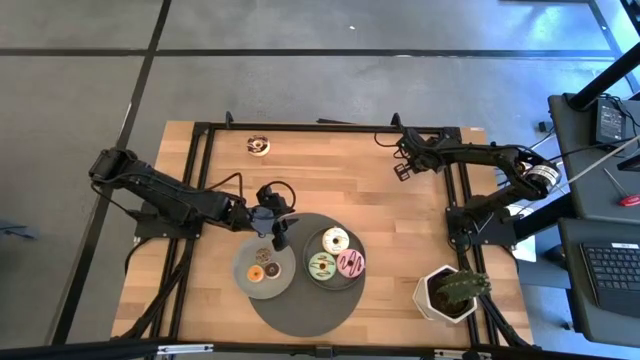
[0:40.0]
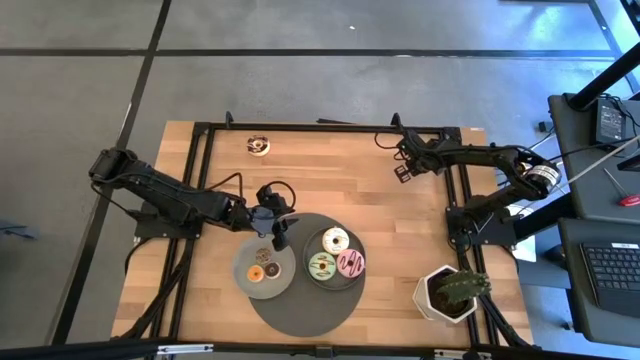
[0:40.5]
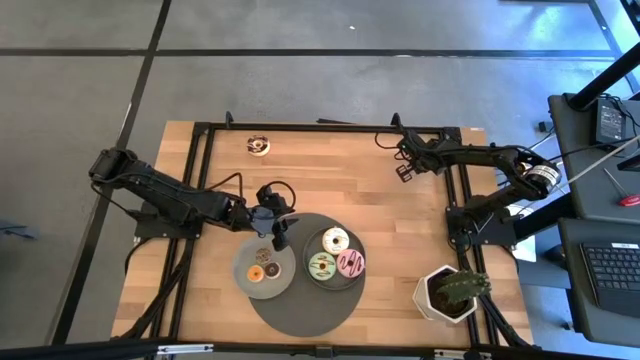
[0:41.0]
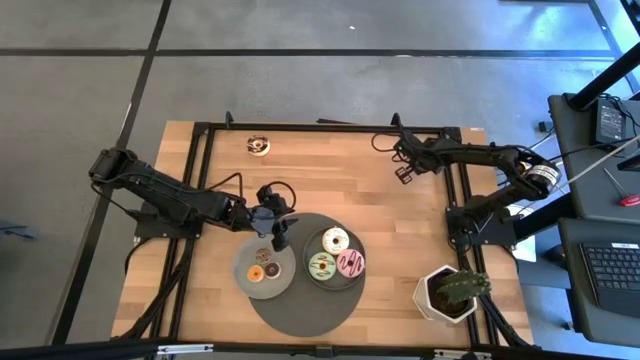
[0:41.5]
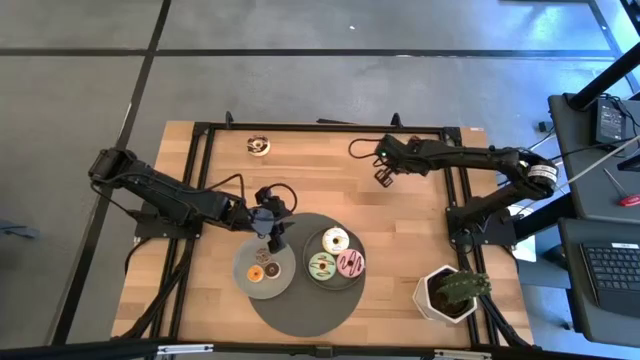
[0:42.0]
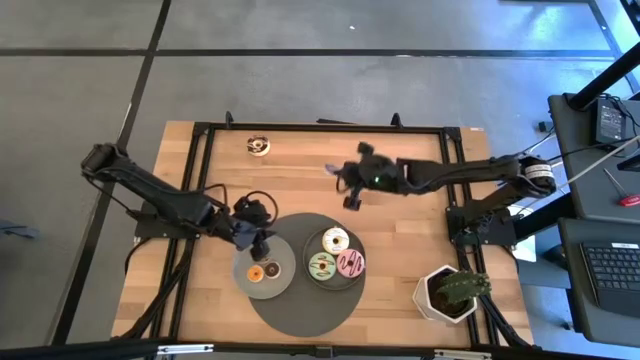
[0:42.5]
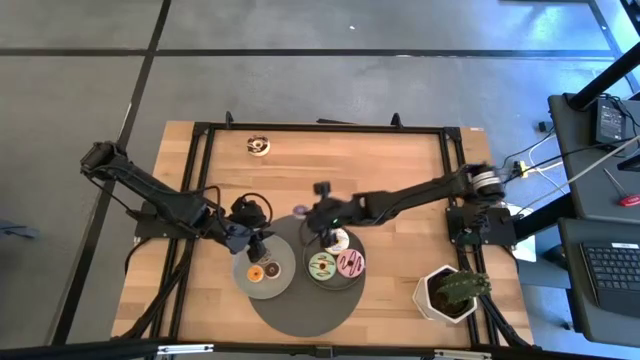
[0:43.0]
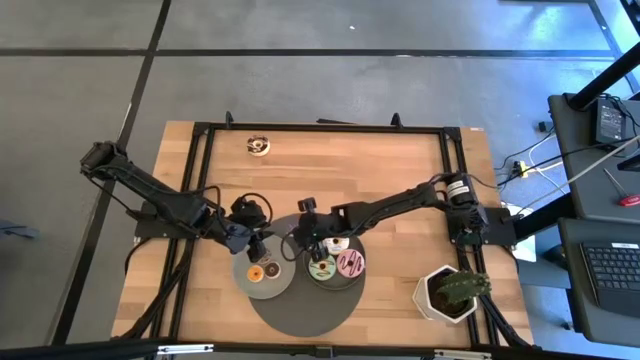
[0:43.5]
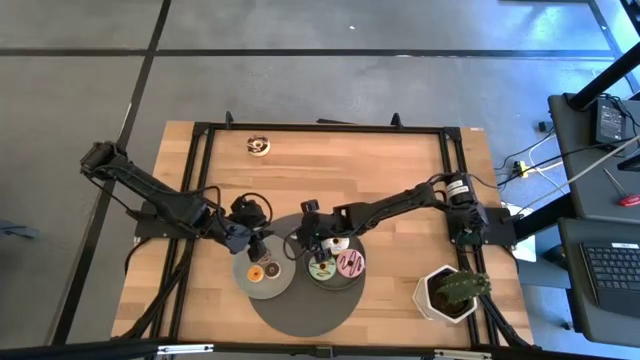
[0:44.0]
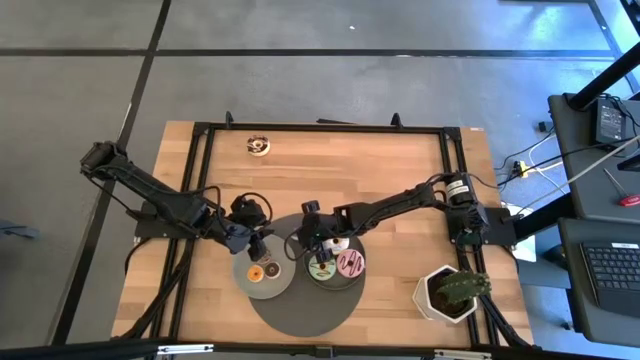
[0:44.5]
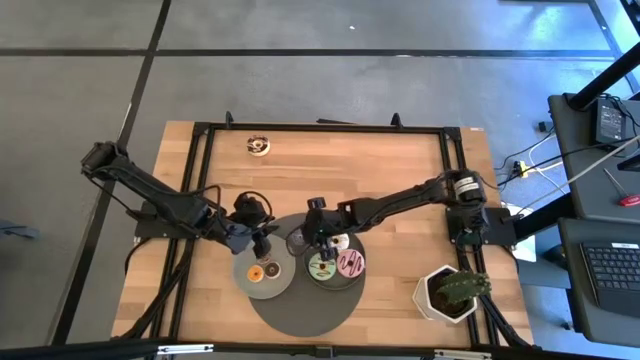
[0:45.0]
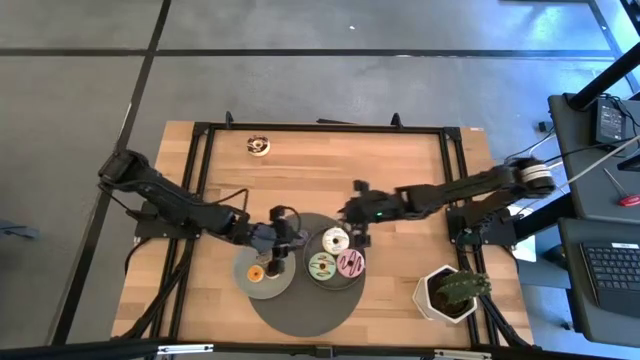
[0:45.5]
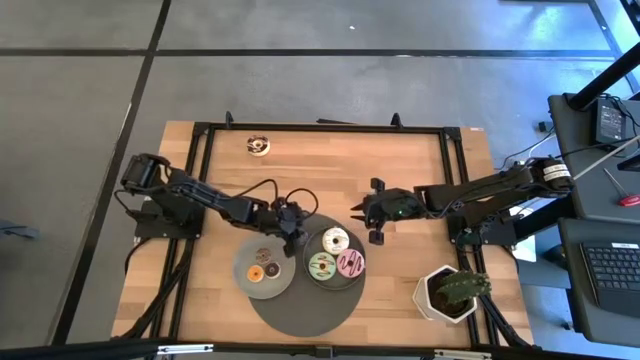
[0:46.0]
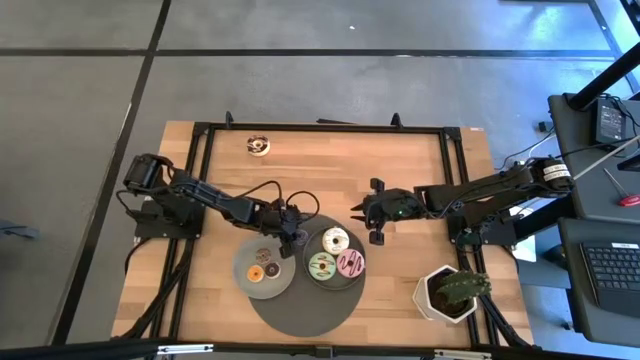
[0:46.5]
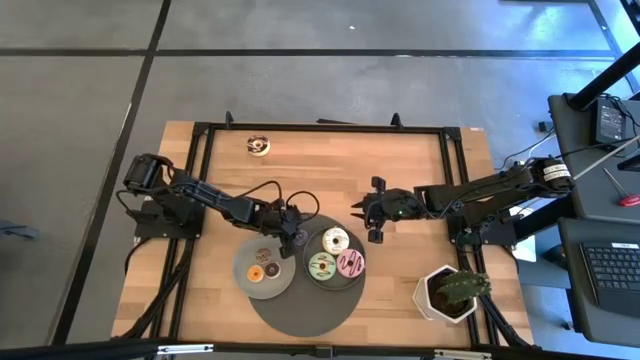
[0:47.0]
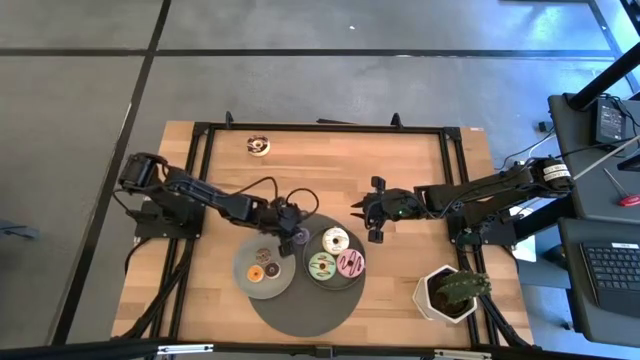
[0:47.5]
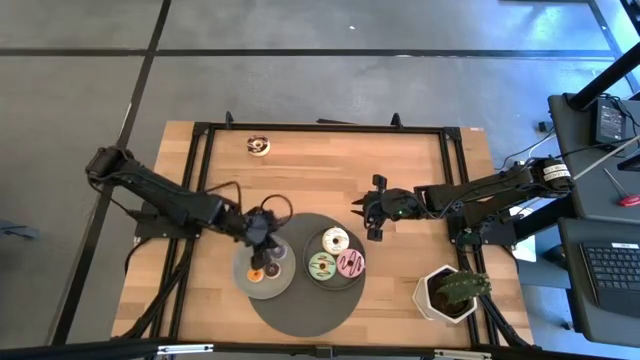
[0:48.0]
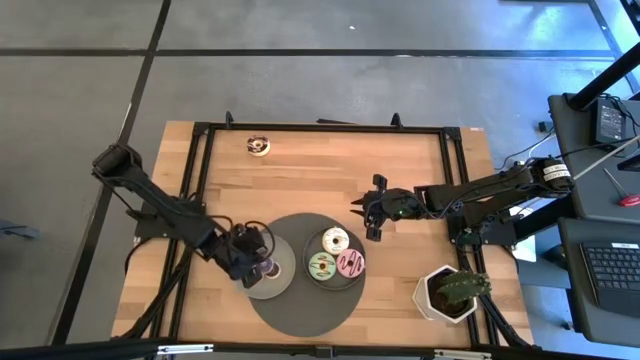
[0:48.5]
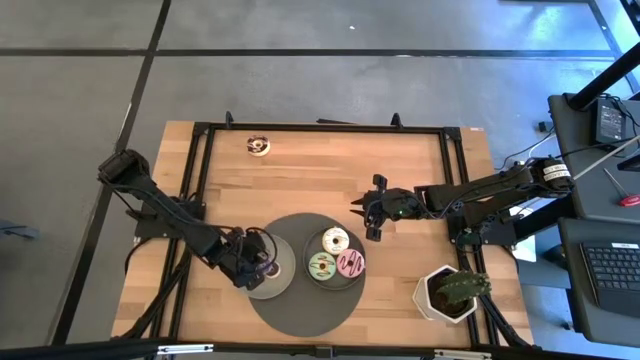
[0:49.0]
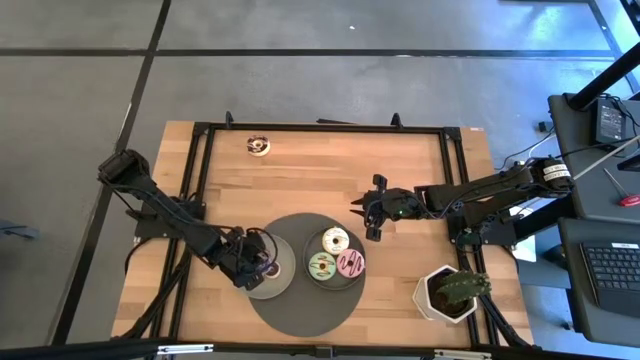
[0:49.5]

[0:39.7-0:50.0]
Task: Pick & Place donuts
Put the small blue donut on the gray plate

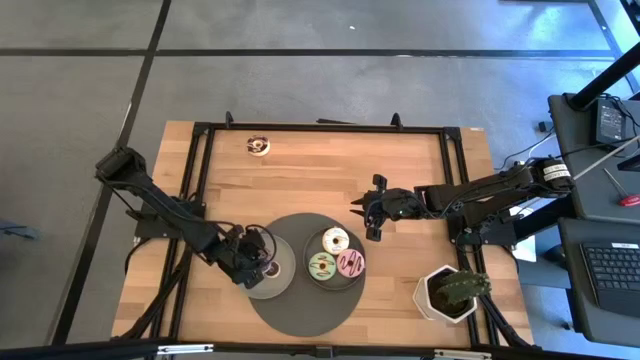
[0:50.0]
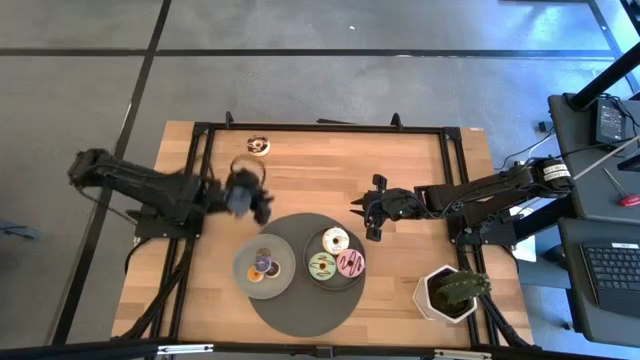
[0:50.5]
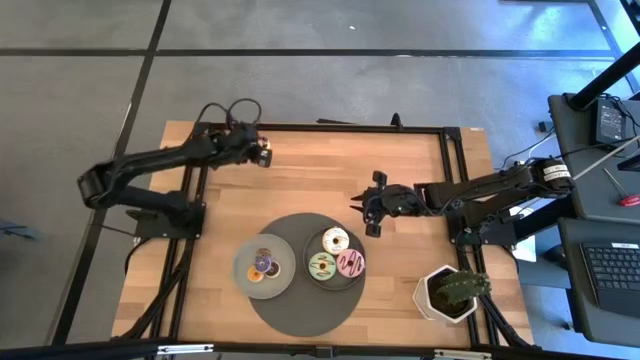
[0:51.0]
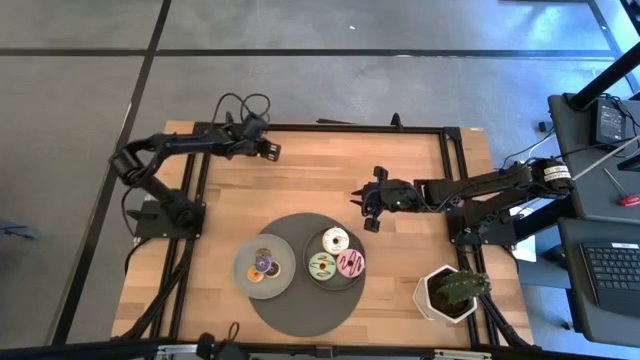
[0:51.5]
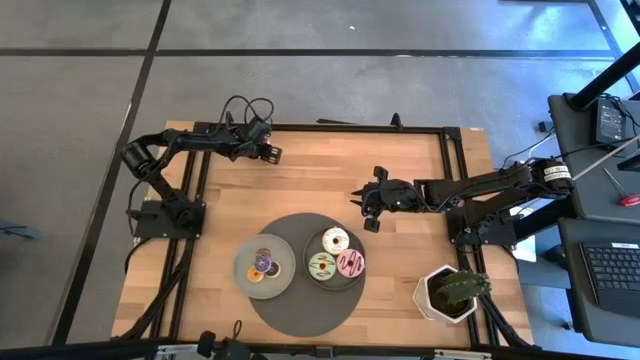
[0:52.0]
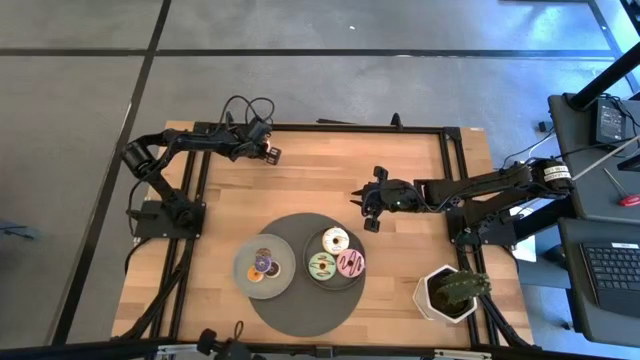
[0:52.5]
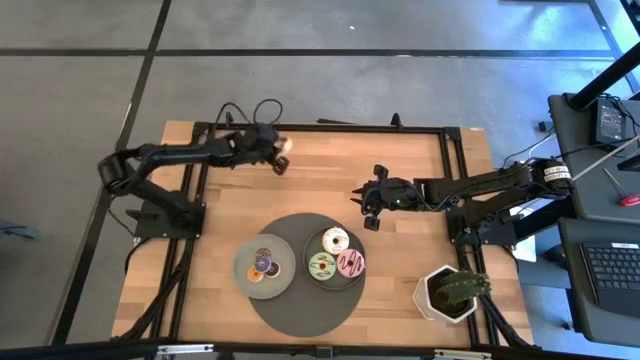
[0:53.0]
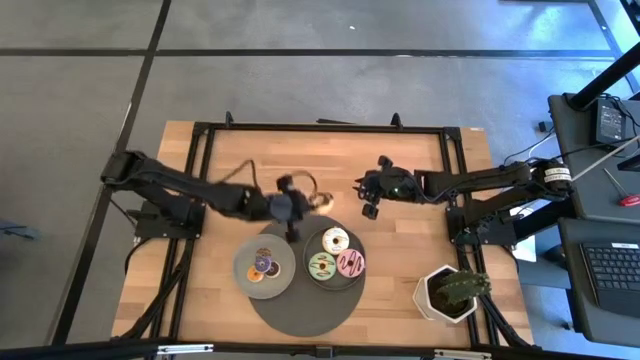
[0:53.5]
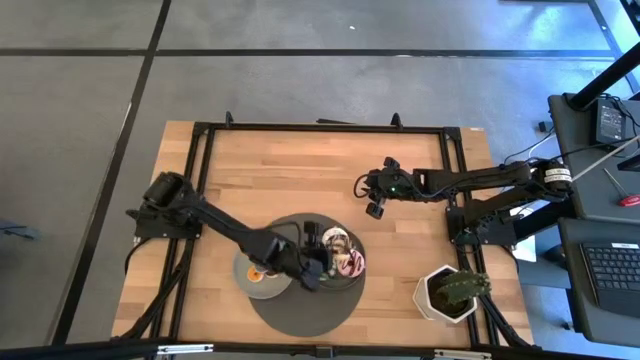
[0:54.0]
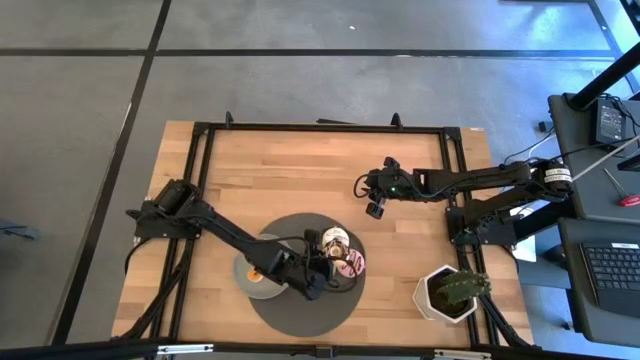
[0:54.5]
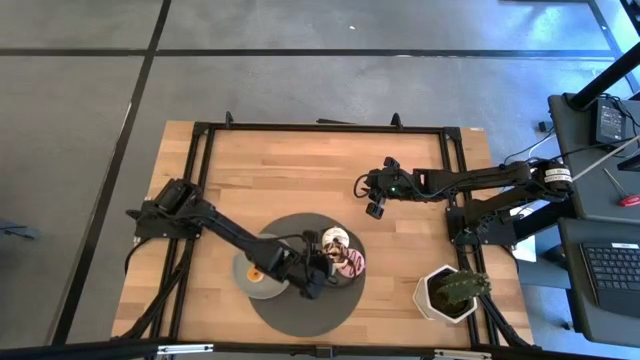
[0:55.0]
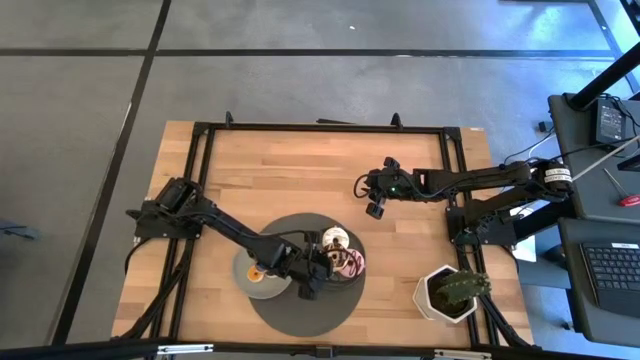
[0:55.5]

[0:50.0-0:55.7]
Put the big black donut on the black plate

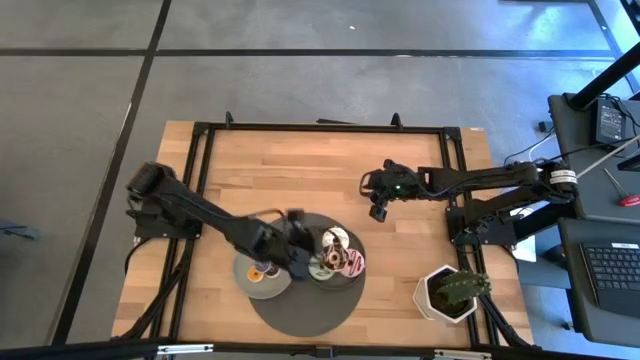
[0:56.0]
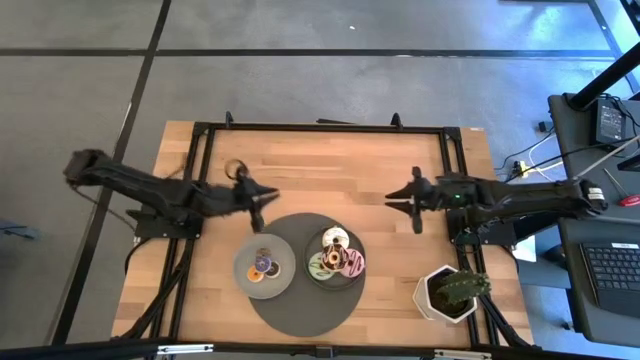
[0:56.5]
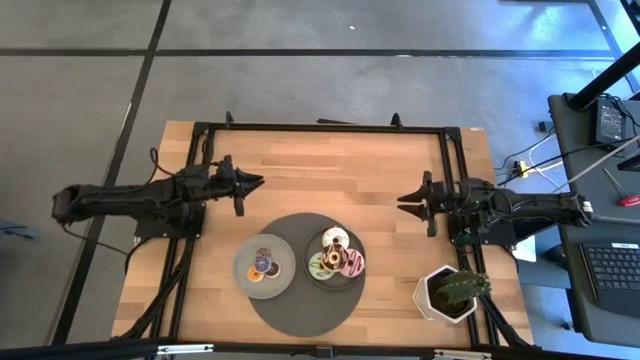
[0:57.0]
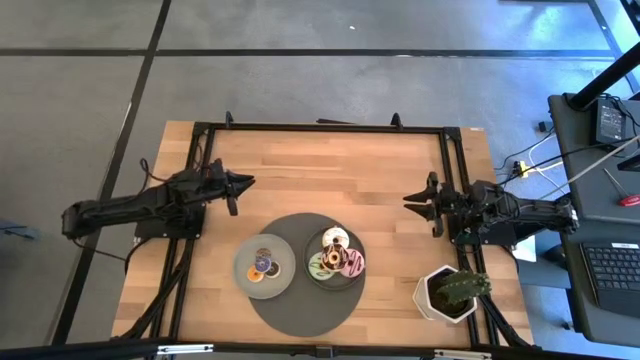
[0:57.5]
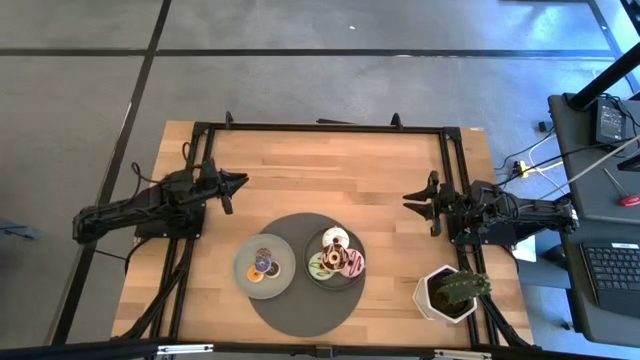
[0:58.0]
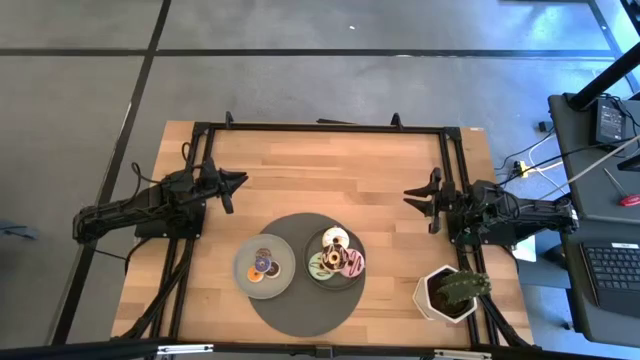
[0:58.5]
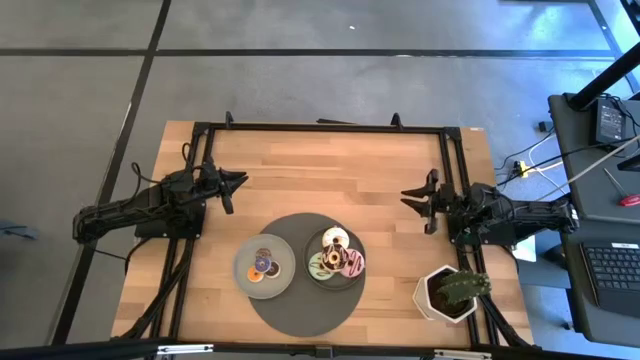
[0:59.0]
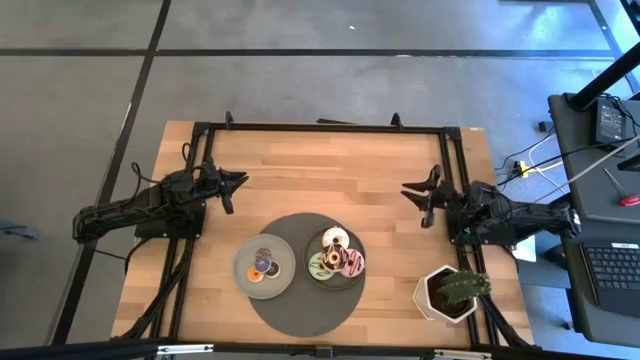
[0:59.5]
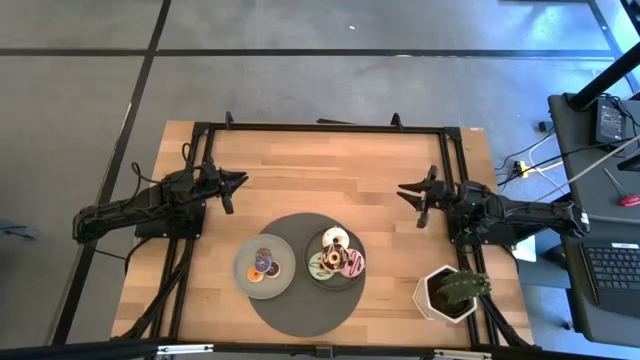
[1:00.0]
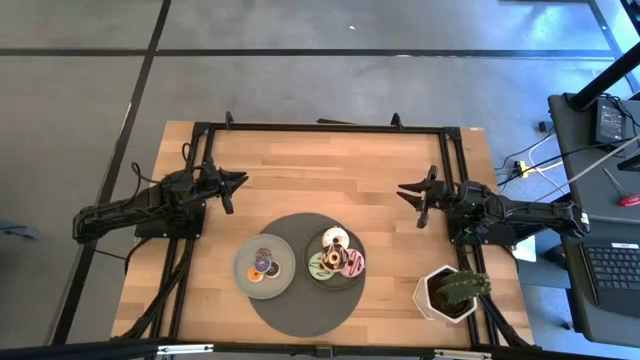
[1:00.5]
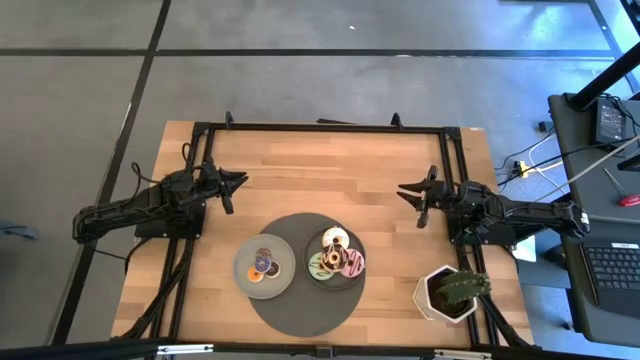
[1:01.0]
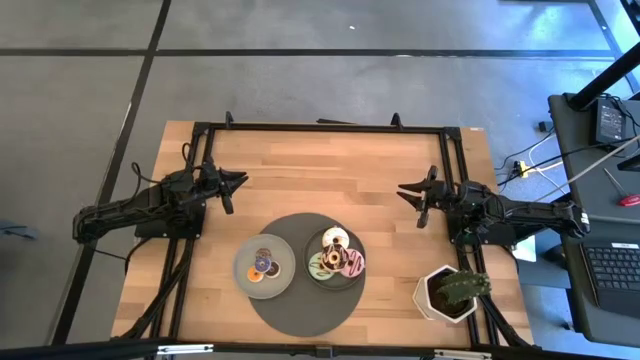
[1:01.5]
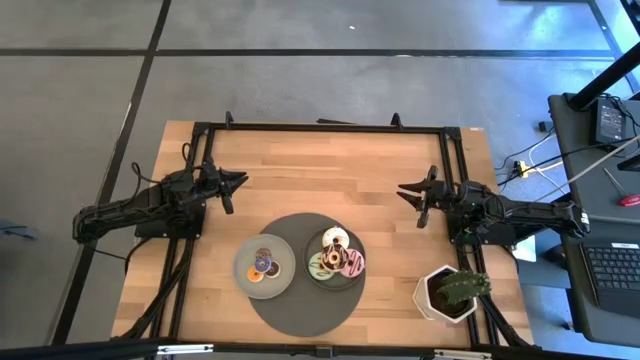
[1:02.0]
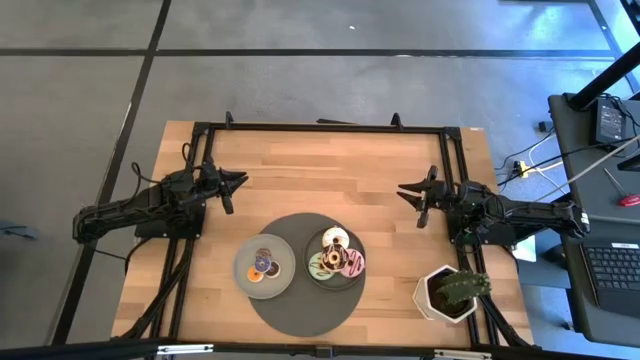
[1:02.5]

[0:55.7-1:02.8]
Return to Home Position
